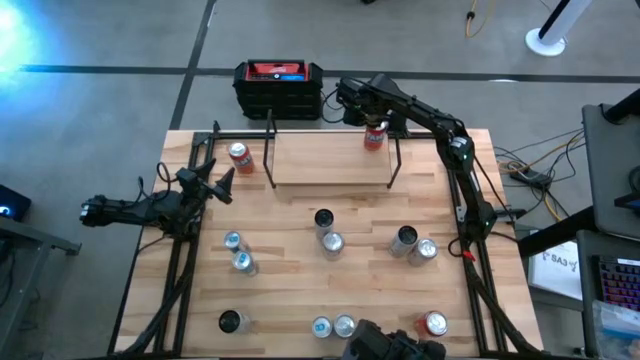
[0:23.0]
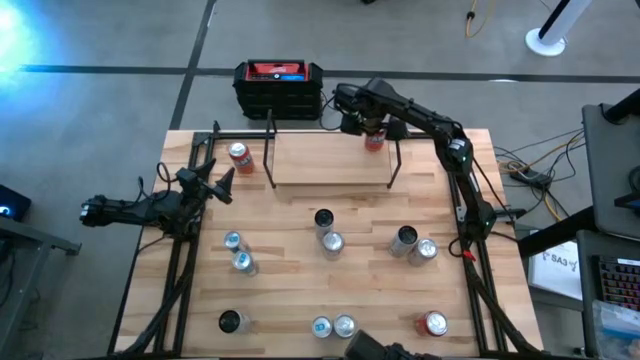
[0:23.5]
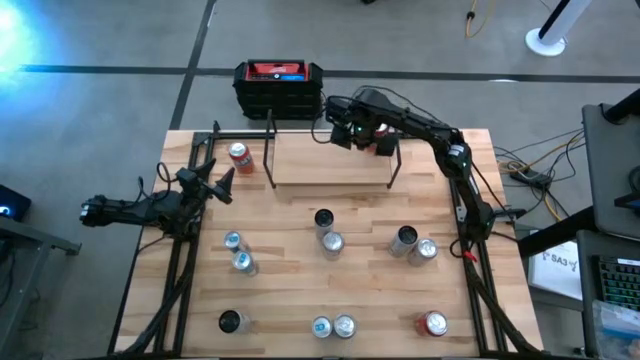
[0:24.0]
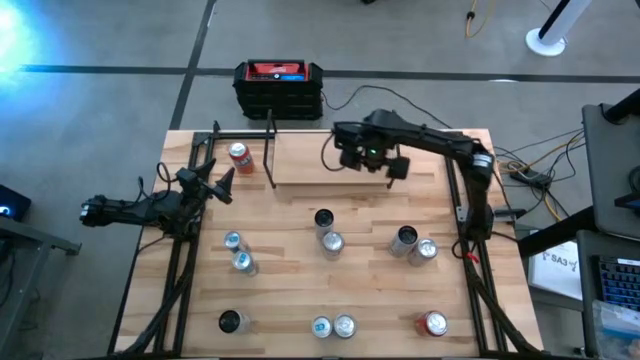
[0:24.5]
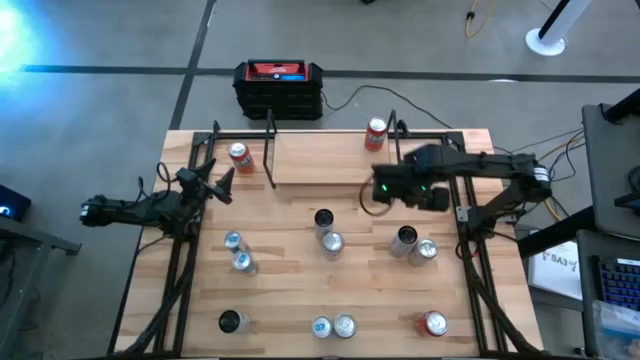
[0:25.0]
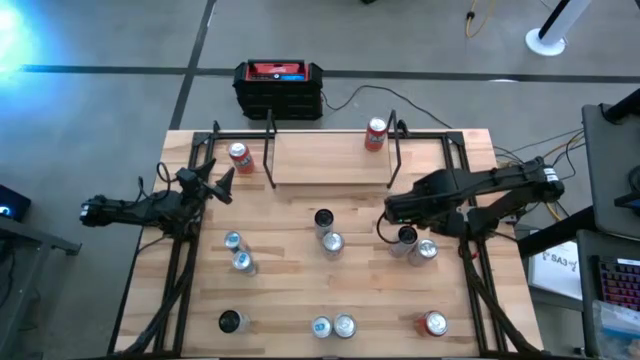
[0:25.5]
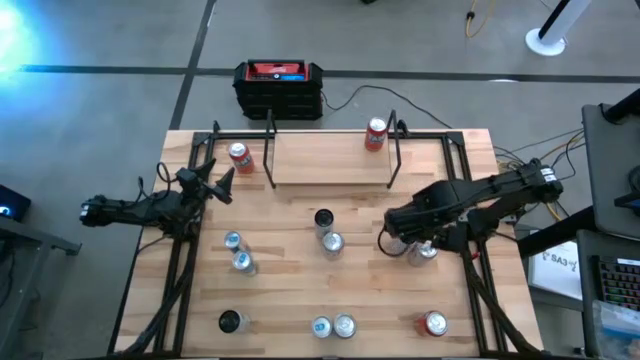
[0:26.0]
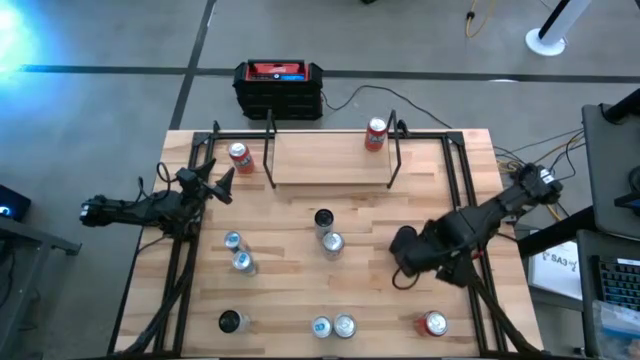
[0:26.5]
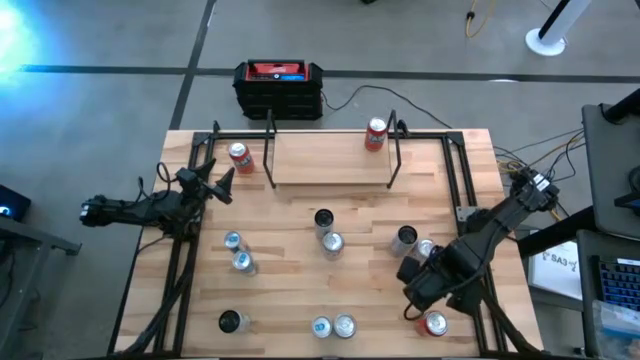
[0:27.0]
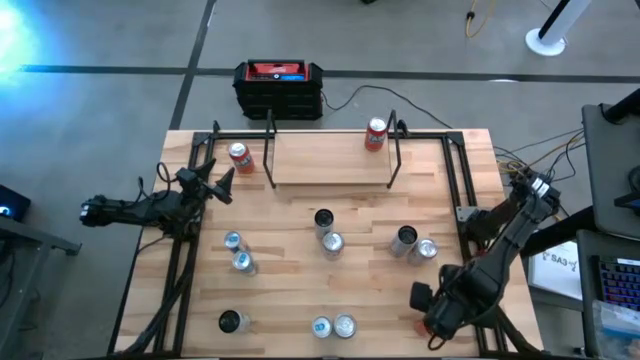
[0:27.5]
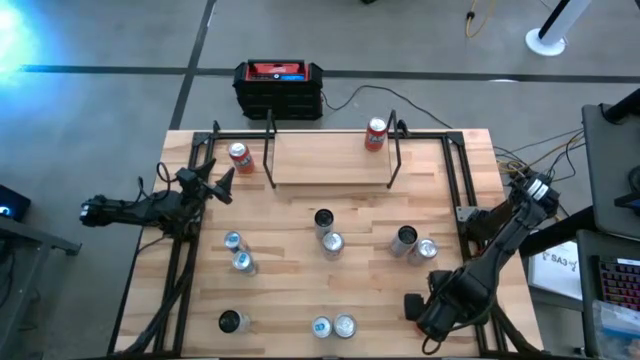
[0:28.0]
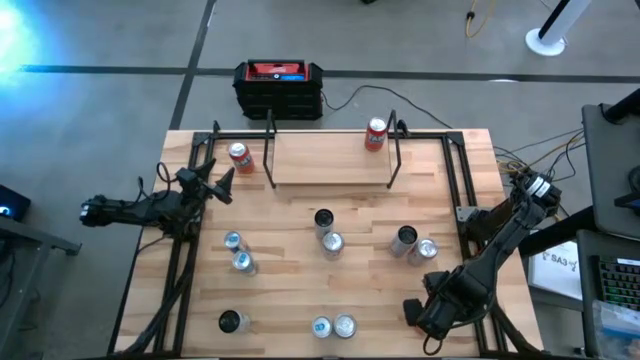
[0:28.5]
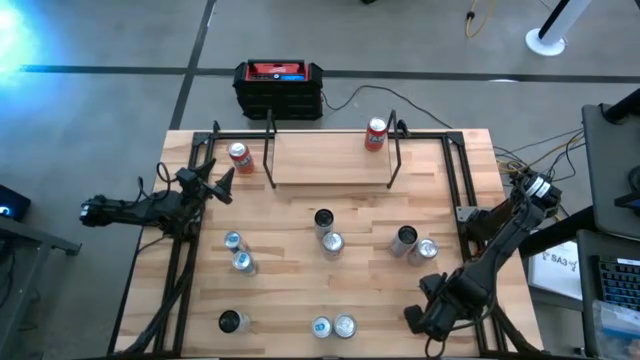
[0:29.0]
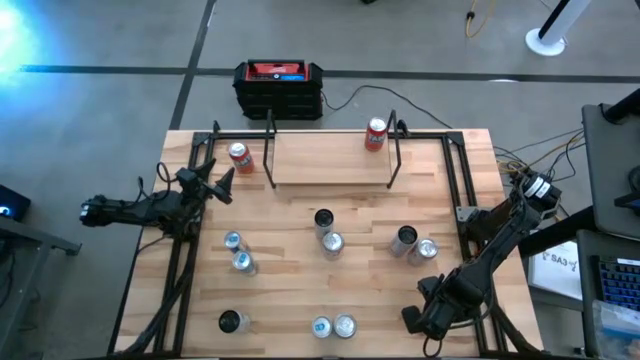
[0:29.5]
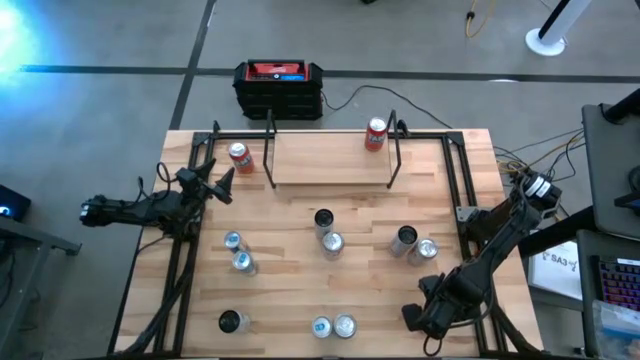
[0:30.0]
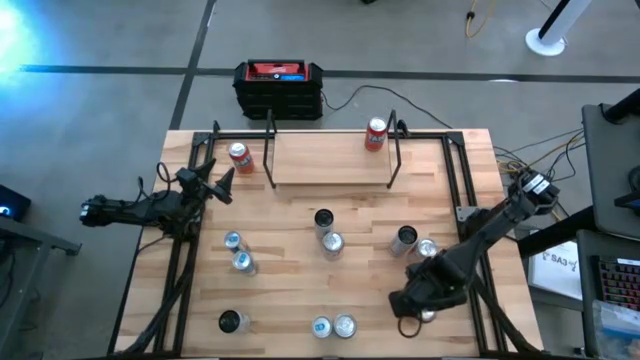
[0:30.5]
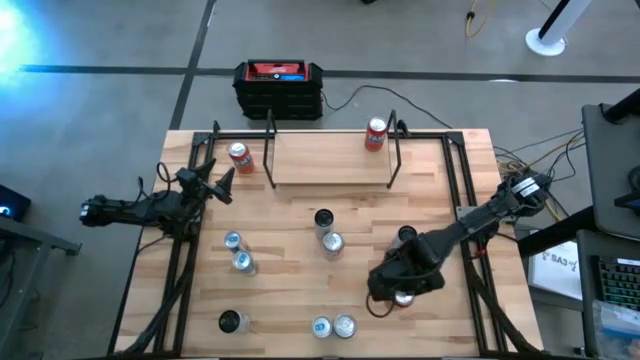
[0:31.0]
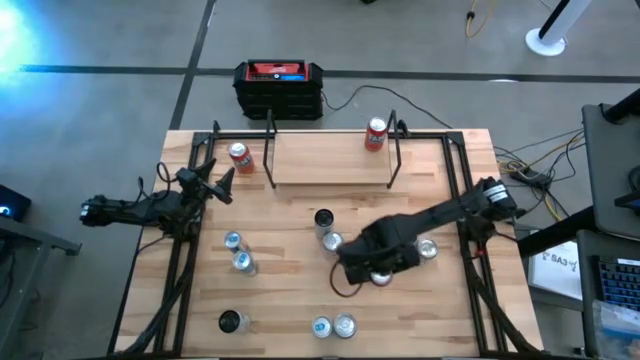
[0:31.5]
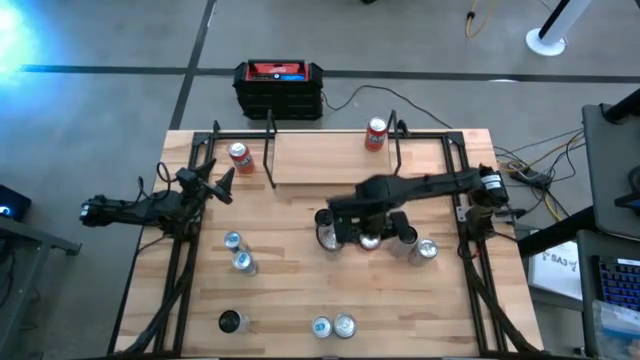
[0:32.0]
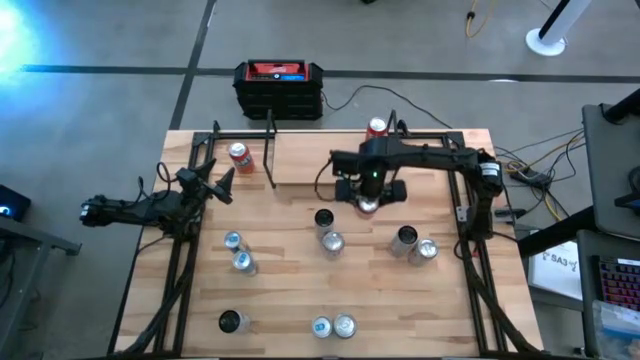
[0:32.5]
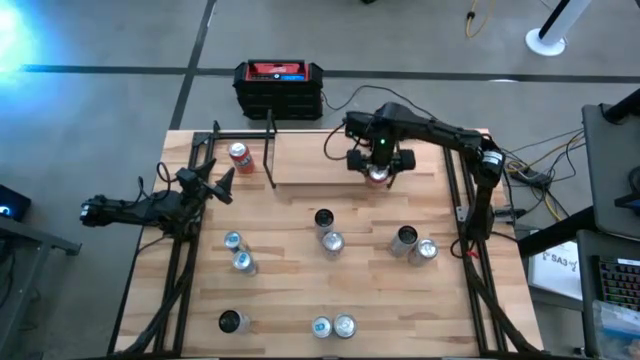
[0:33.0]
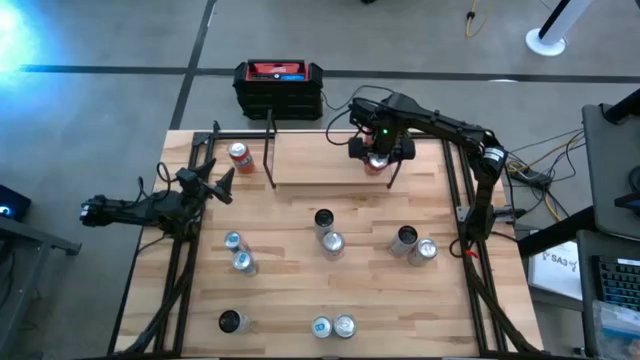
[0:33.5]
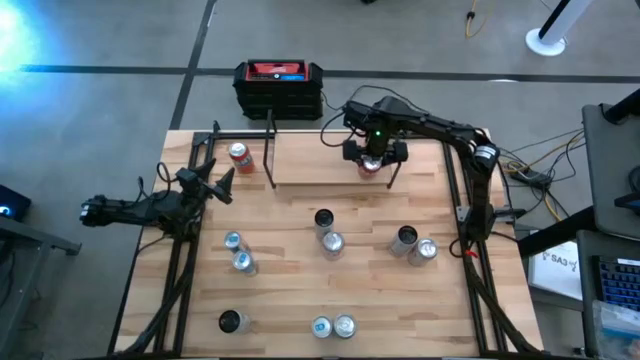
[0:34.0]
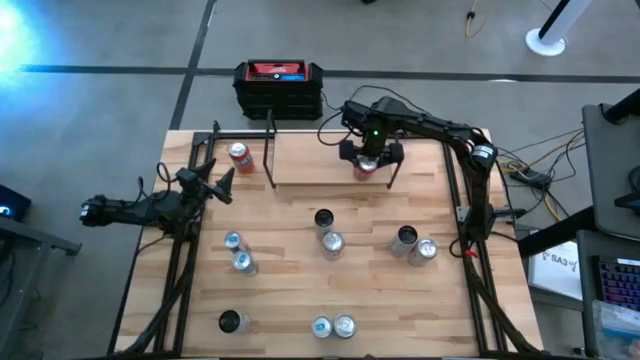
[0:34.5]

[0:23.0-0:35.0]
Task: Place canned beverage on shelf
Put the bottom red soda can on the shelf aligned with the other red soda can

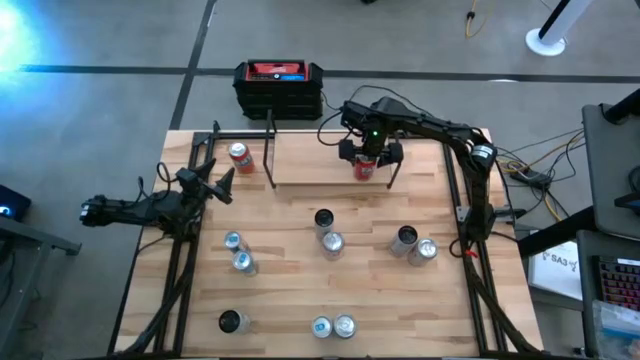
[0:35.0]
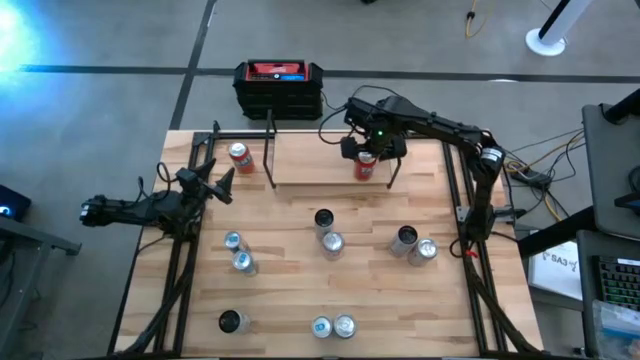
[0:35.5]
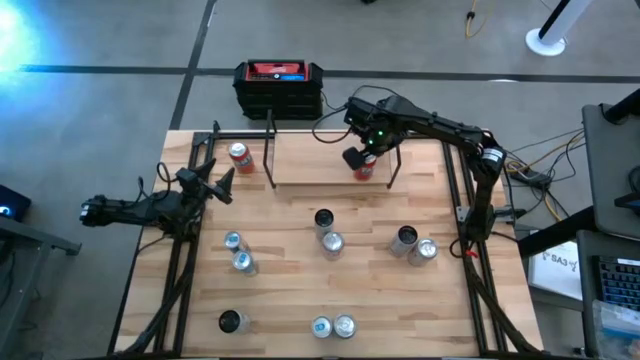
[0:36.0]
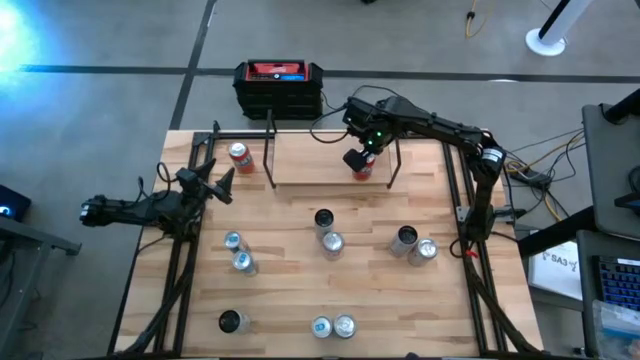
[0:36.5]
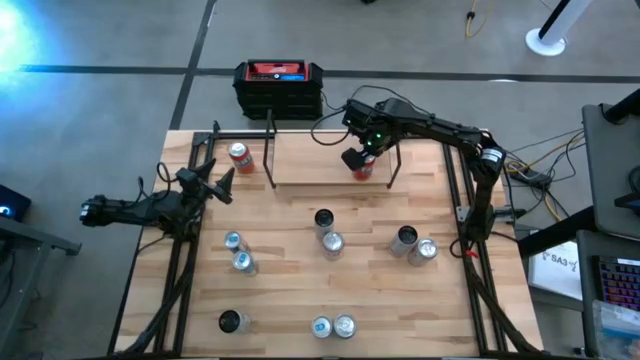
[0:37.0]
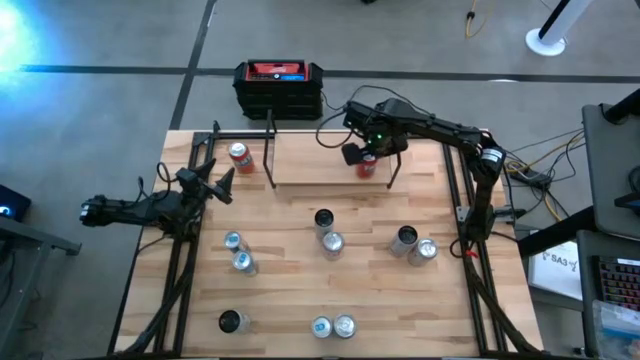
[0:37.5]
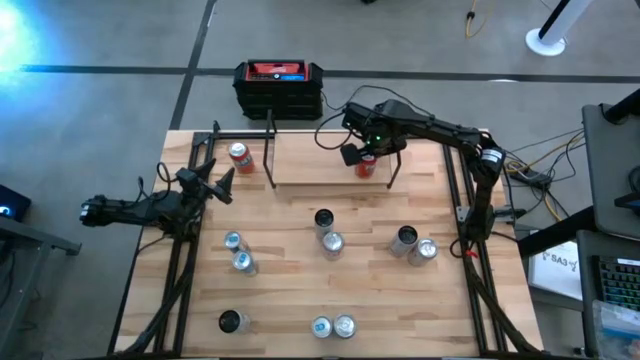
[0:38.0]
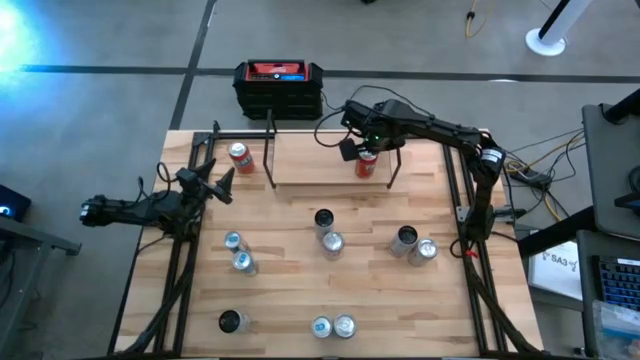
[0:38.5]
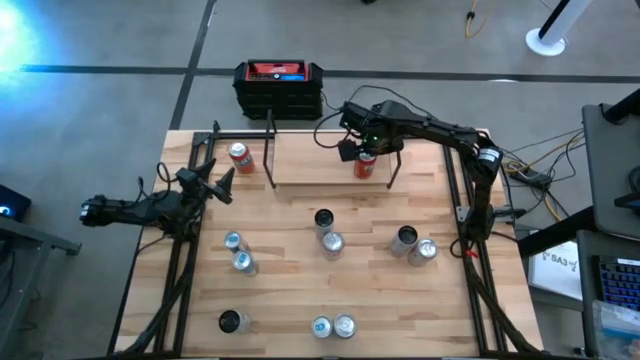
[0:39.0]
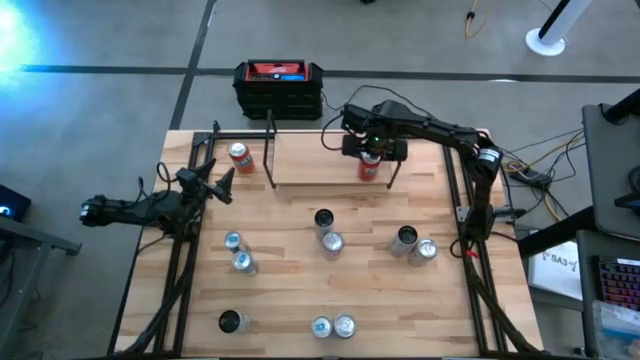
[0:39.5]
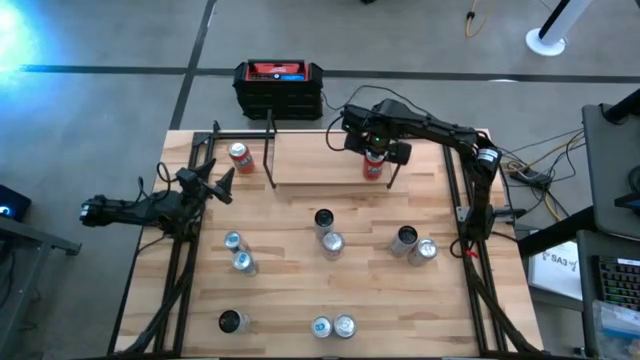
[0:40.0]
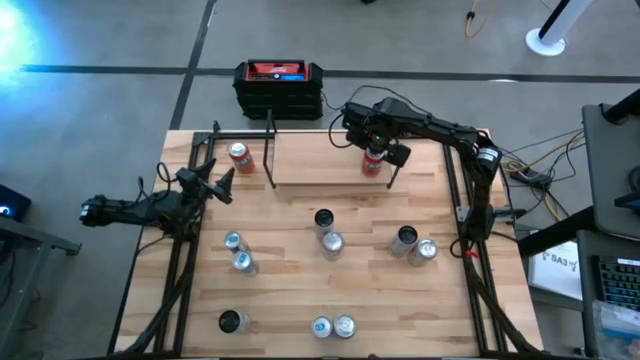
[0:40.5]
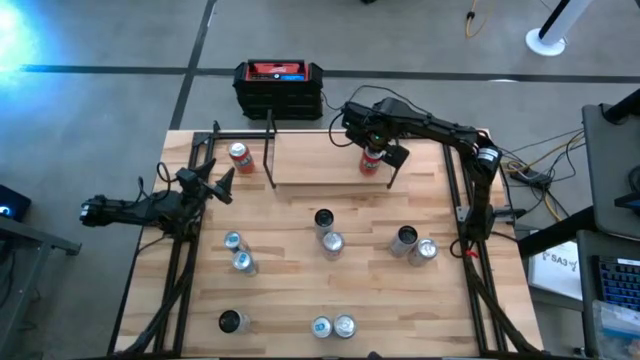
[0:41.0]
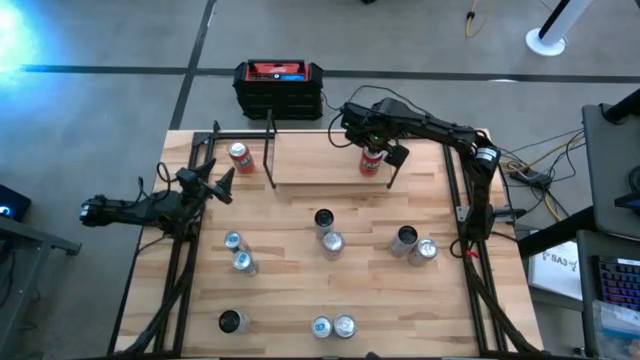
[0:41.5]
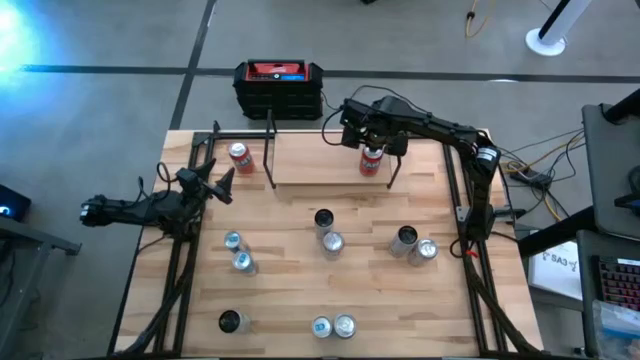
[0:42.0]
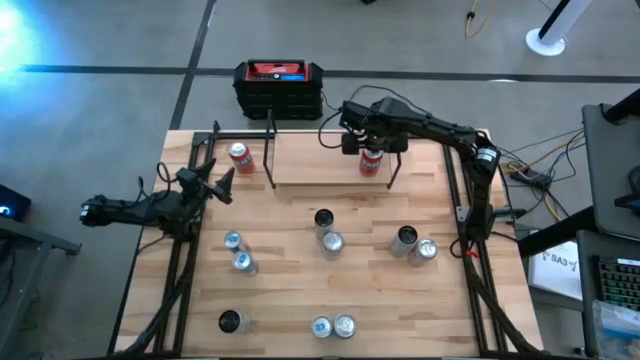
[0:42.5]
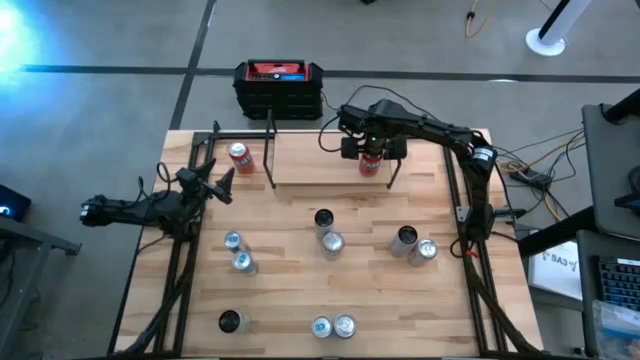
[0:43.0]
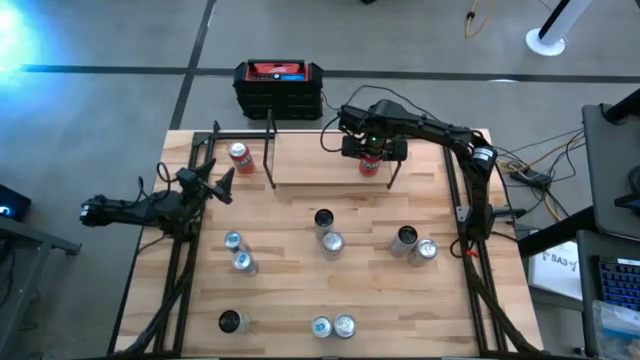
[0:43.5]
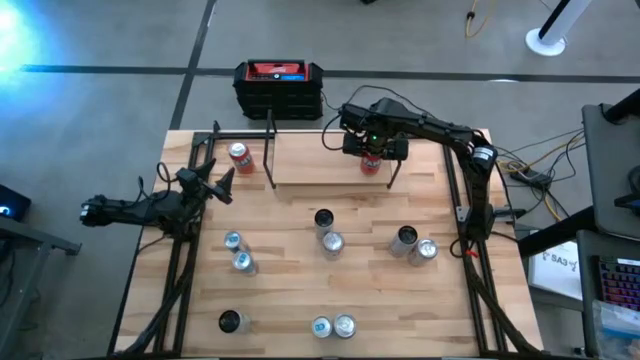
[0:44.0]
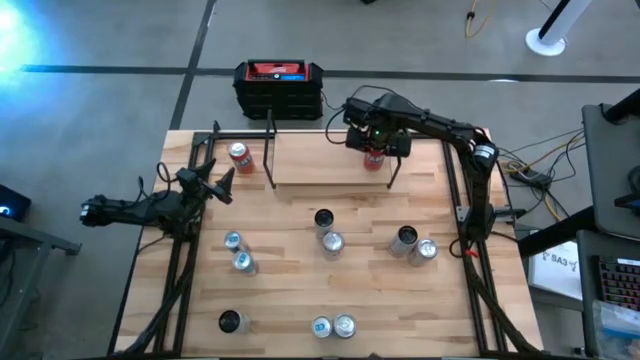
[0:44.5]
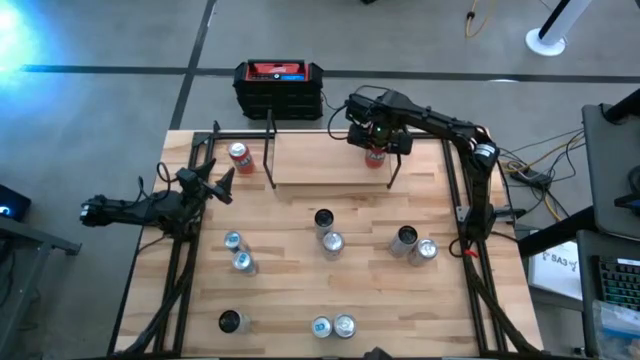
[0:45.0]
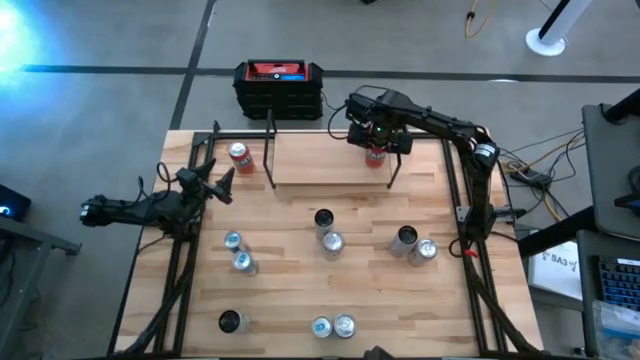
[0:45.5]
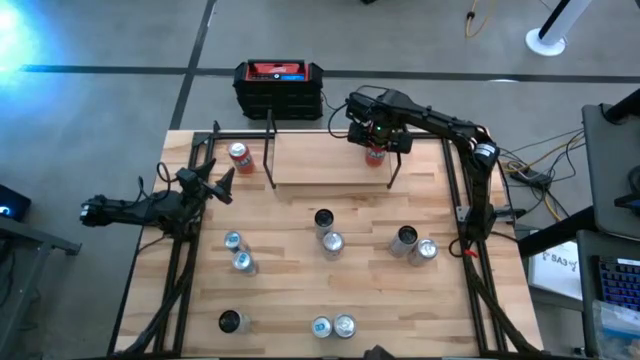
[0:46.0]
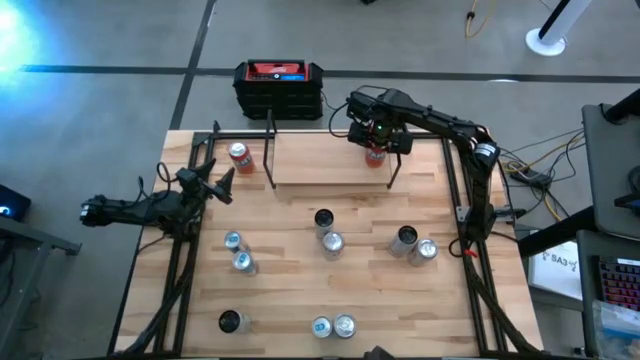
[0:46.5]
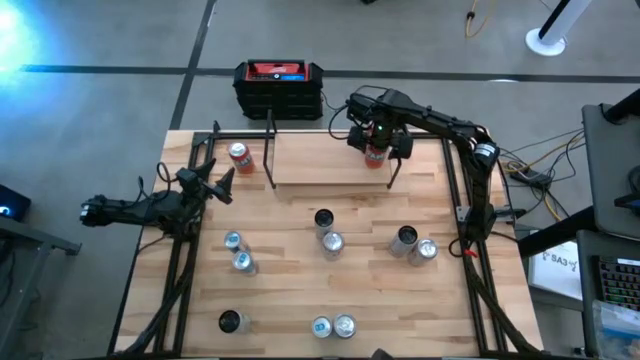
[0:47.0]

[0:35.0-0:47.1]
Put the bottom red soda can on the shelf aligned with the other red soda can
